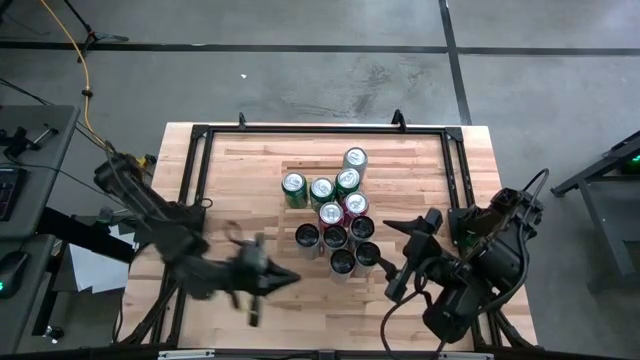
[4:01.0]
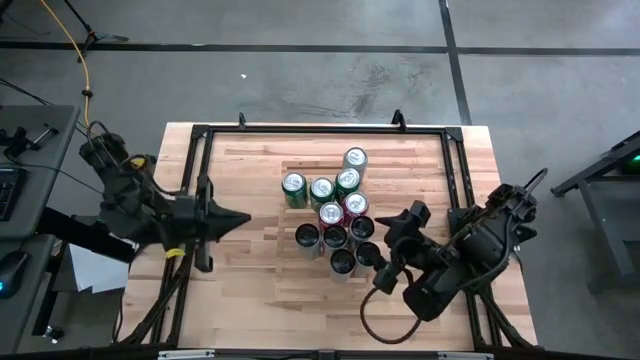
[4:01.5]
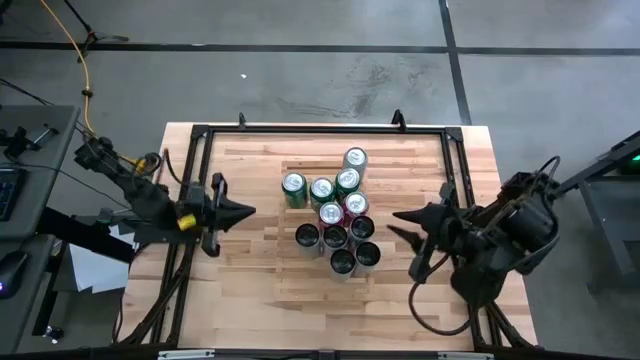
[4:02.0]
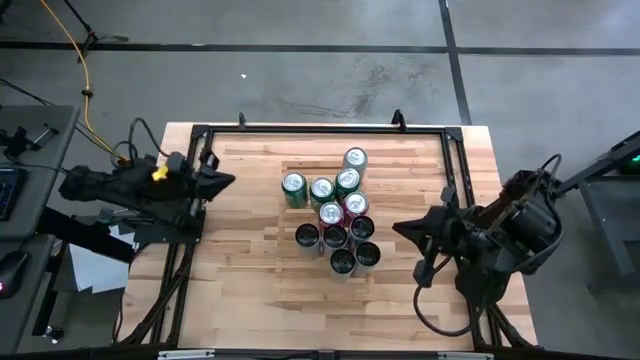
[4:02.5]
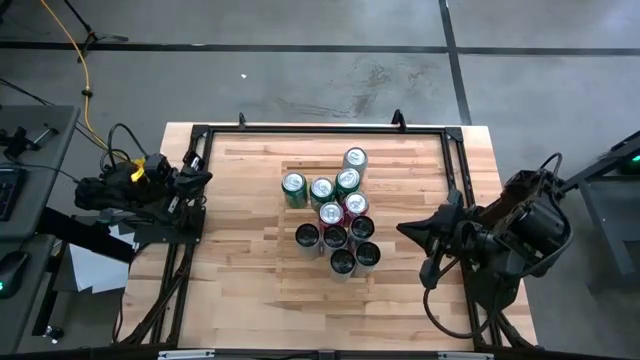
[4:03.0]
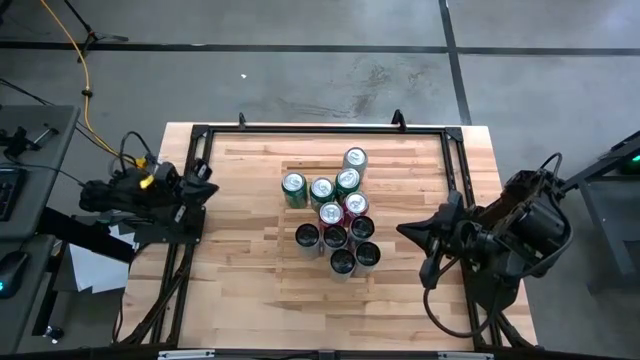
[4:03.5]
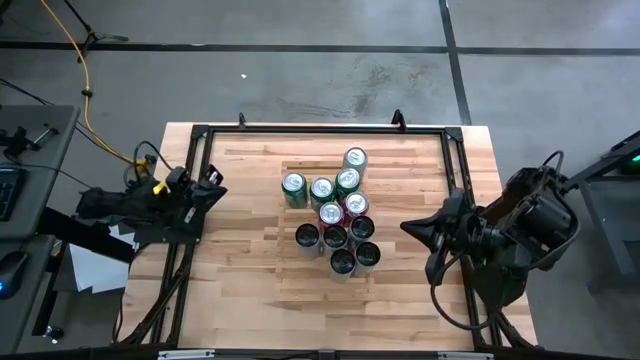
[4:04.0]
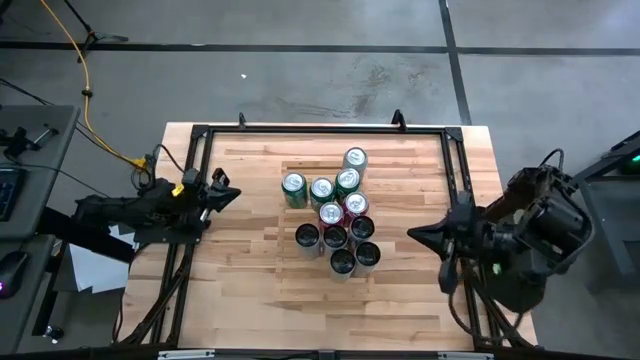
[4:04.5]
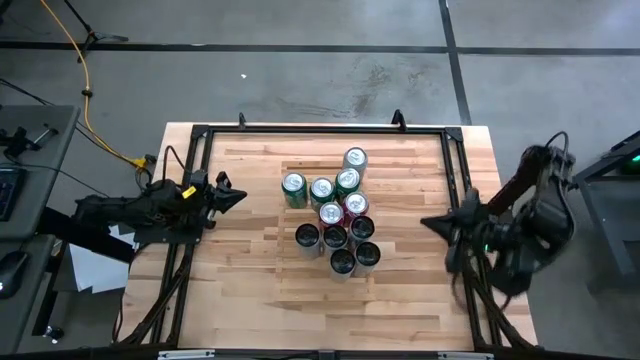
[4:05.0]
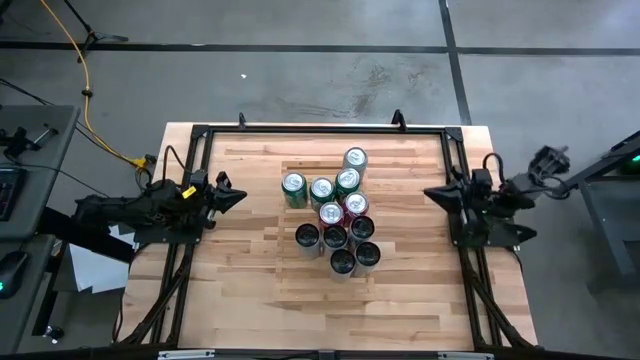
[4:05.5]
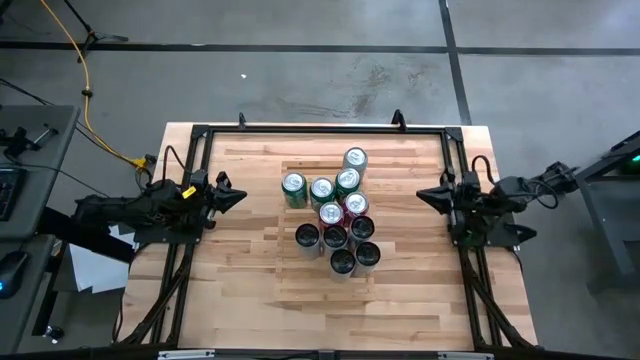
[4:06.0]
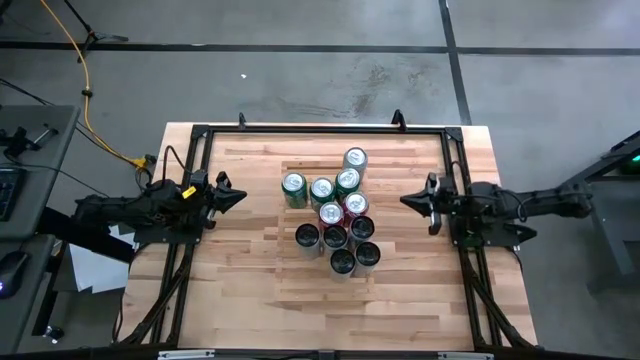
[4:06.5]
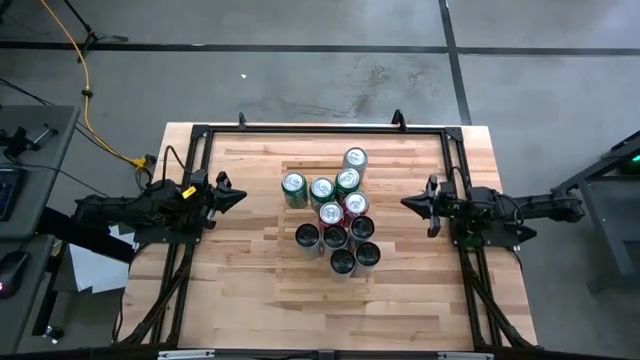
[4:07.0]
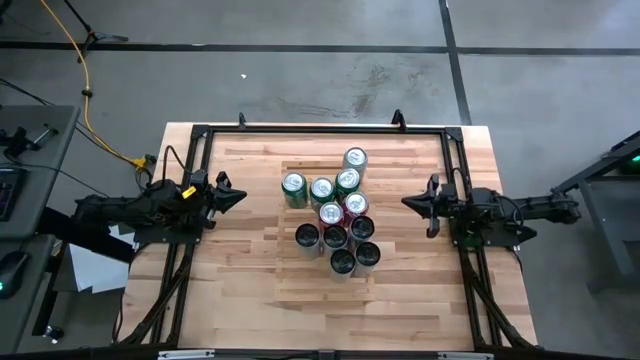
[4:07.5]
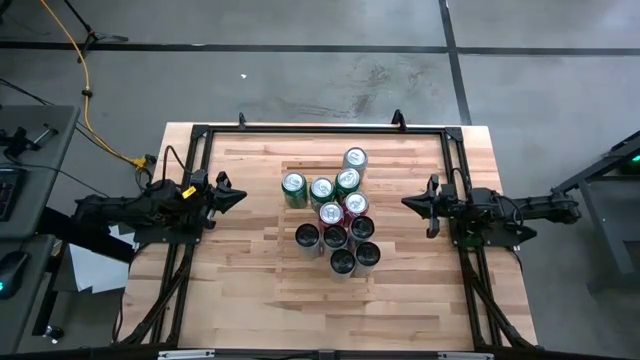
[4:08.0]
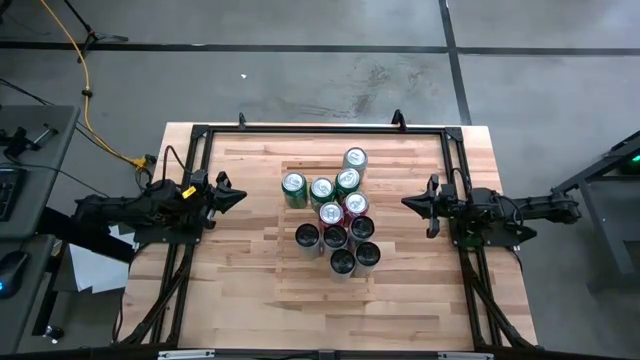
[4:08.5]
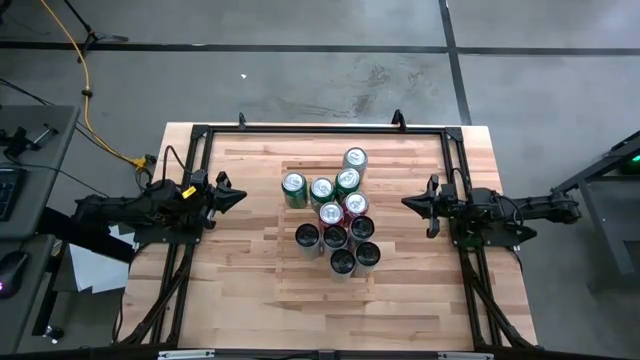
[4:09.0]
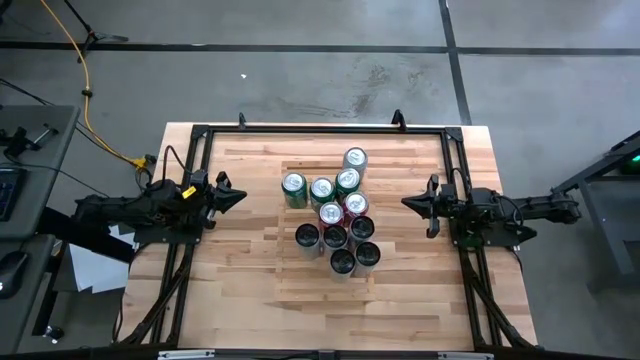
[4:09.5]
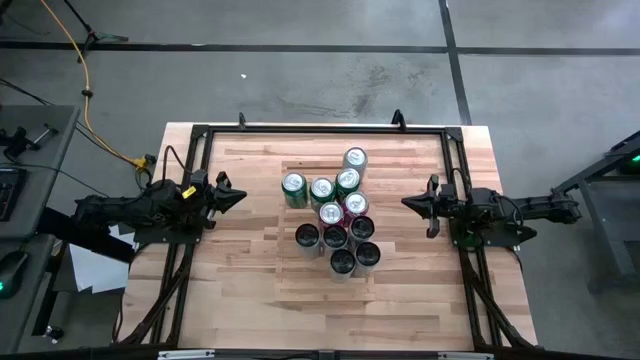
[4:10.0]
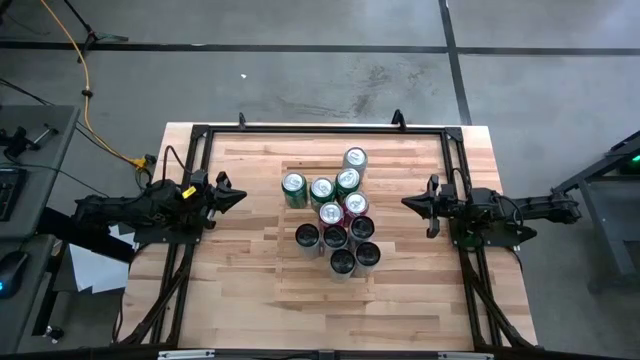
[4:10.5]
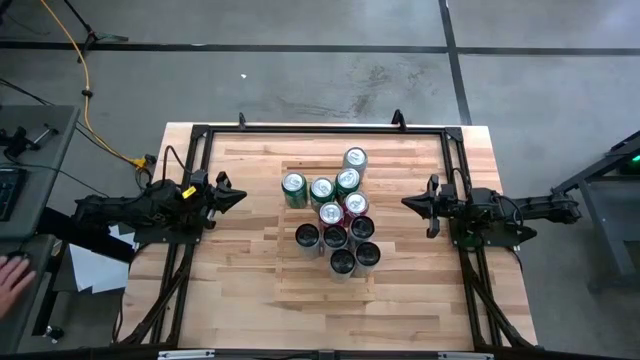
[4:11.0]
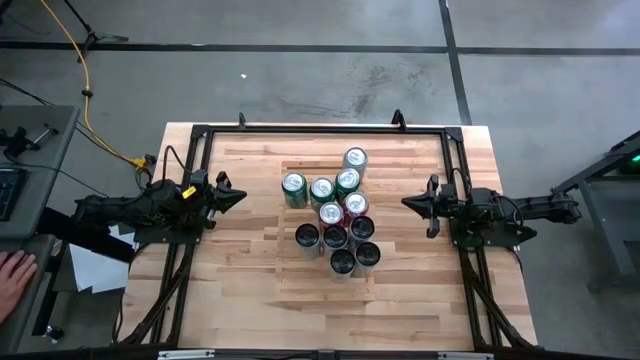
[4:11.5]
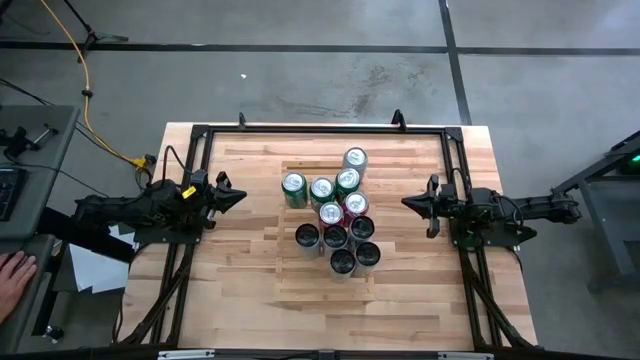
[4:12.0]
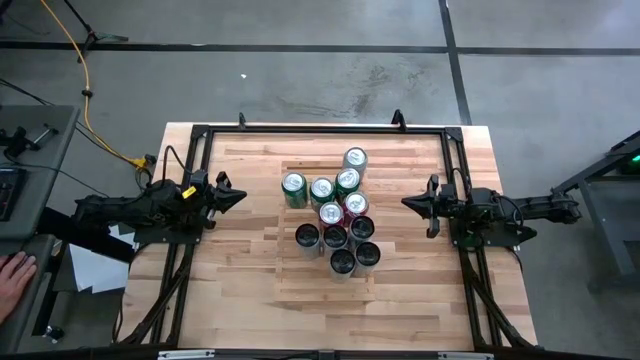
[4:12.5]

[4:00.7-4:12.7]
Task: Place canned beverage on shelf
Return to Home Position

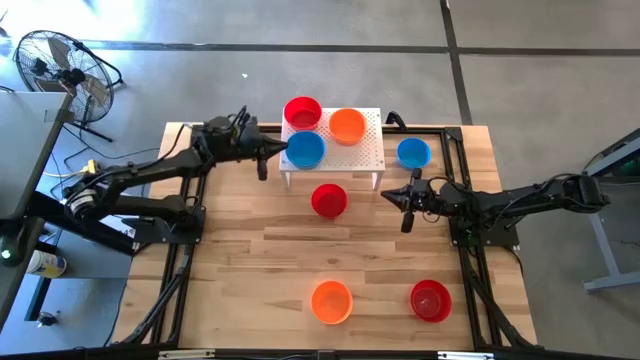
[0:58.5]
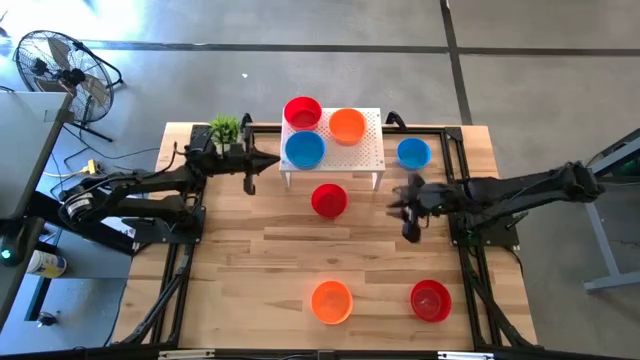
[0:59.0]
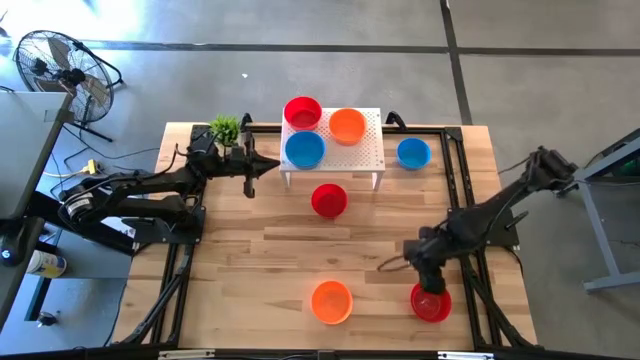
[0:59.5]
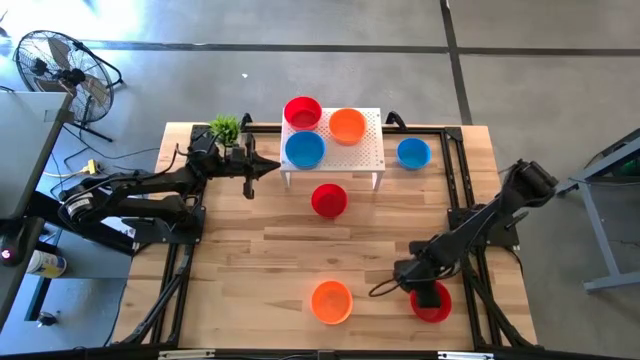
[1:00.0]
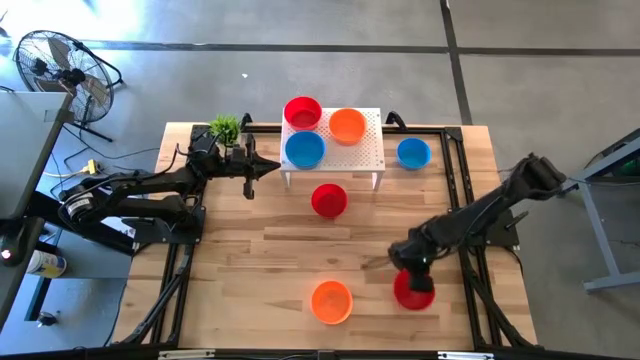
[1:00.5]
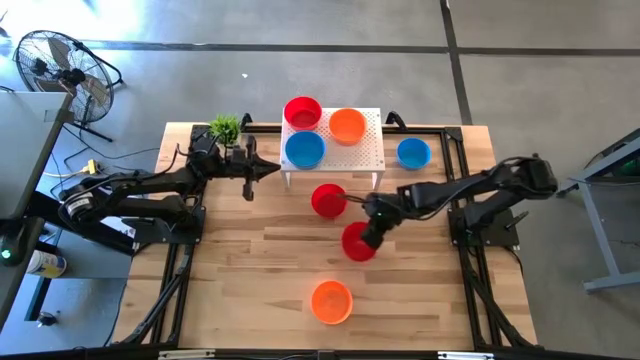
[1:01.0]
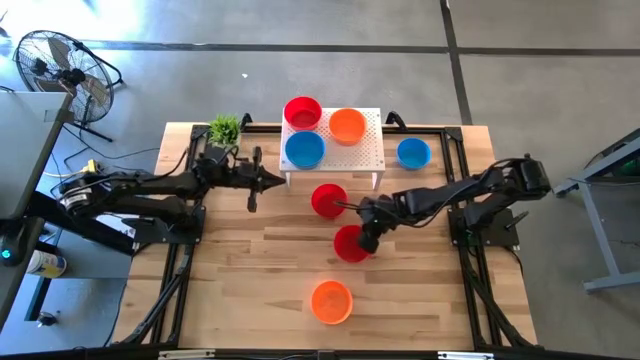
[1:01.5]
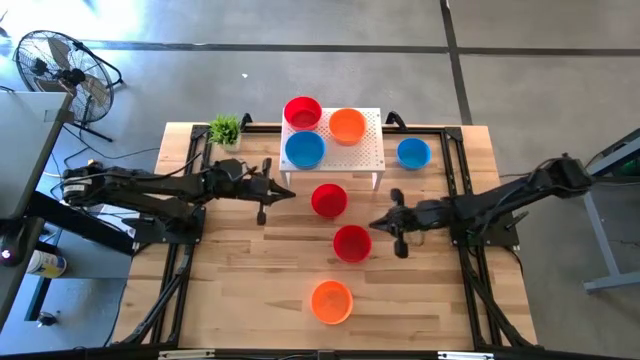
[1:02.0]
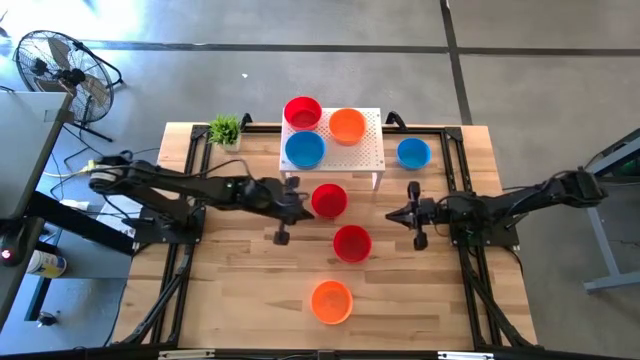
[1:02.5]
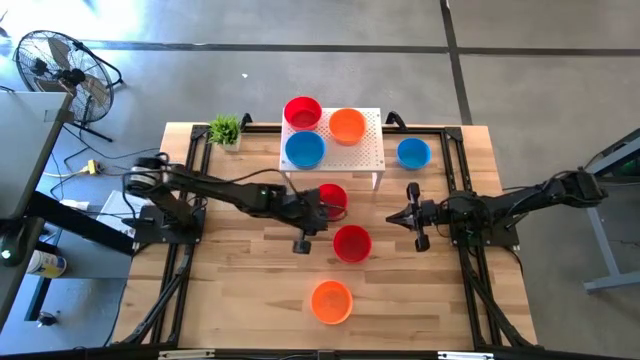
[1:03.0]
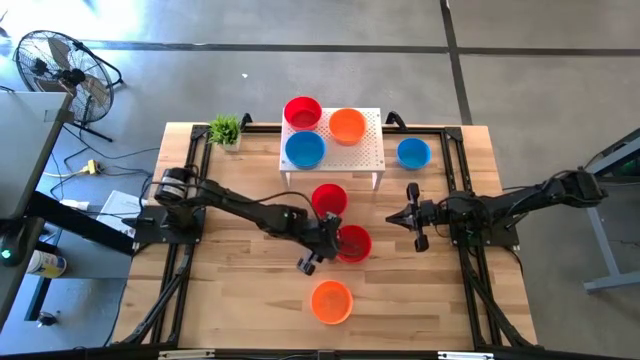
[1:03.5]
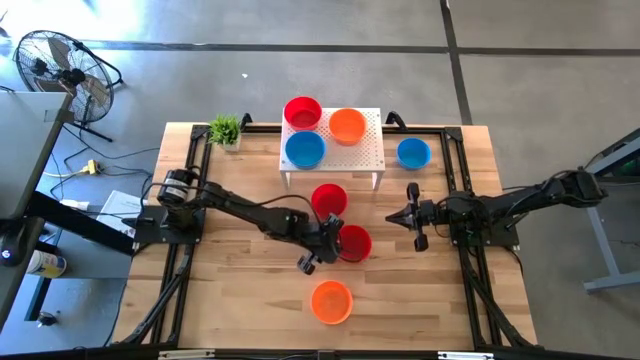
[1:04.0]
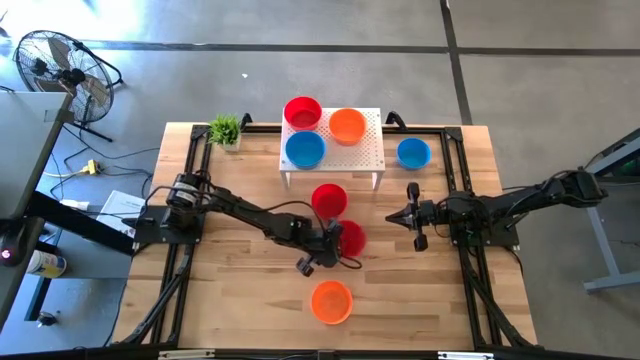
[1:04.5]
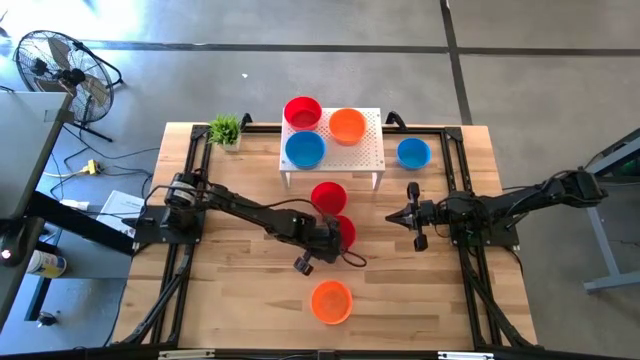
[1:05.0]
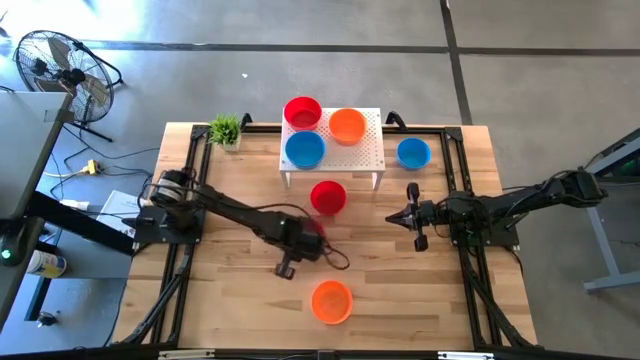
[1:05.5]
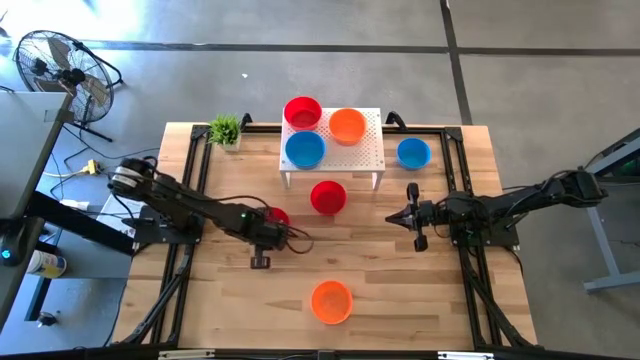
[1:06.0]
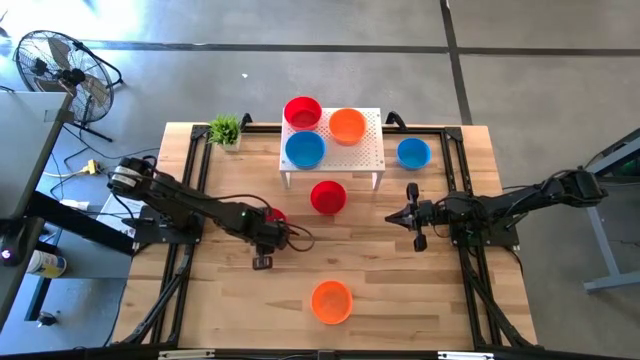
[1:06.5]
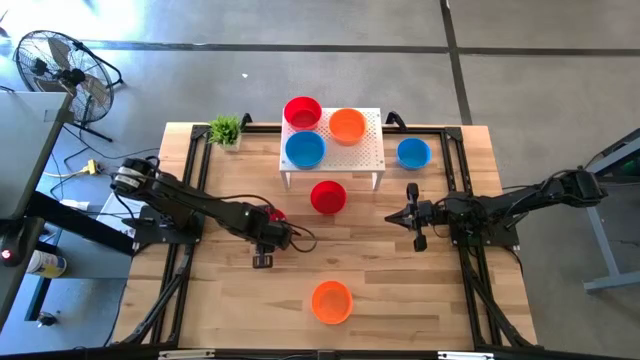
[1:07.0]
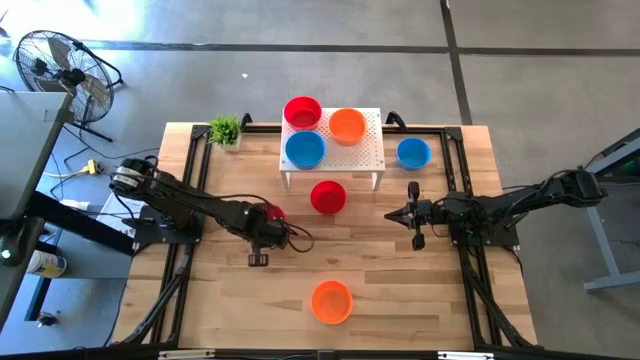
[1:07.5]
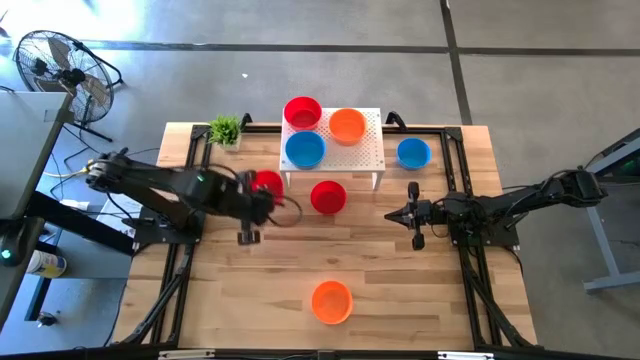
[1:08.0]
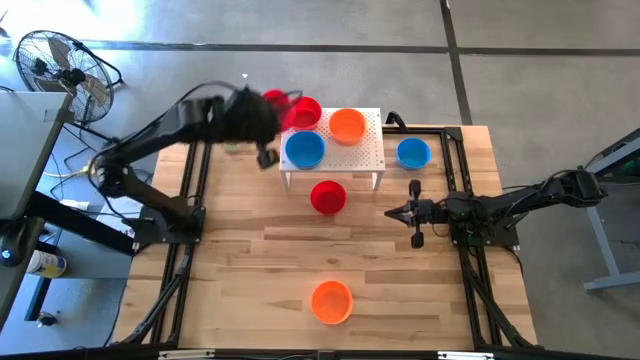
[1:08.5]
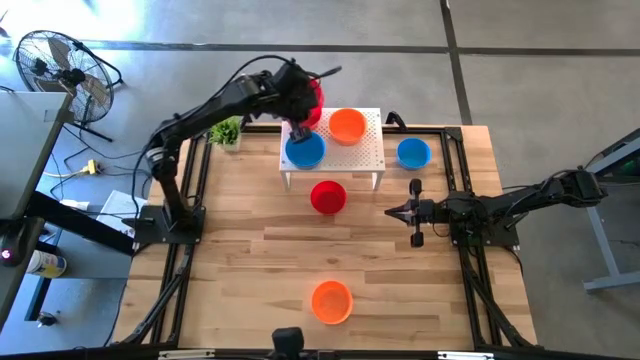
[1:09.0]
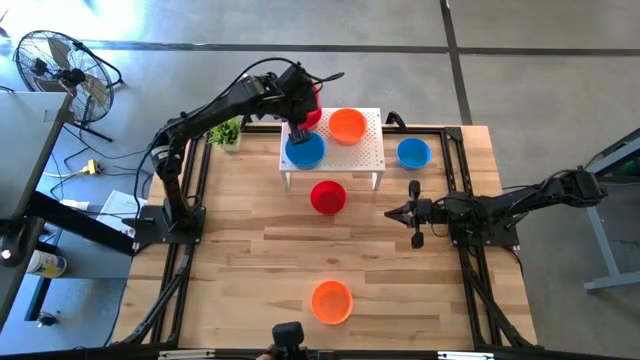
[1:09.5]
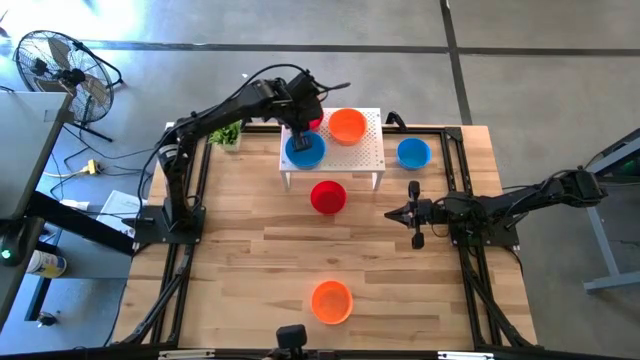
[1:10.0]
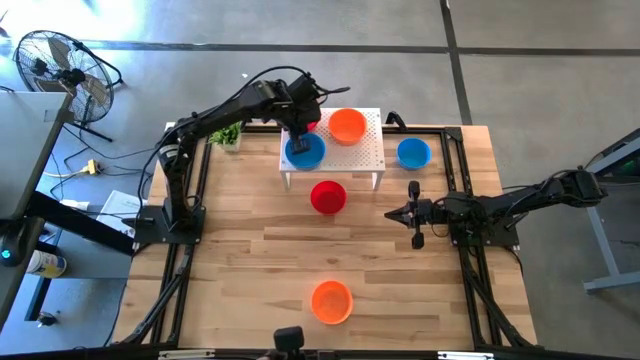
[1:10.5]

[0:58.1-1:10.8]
Task: Pick & Place Mini bowls
Stack the bottom red bowl on top of the red bowl on the shelf
